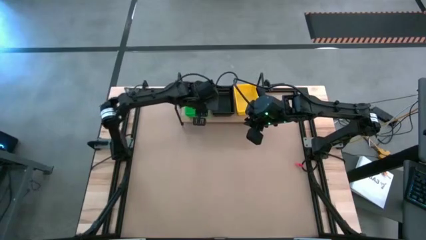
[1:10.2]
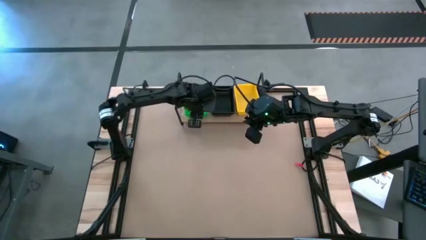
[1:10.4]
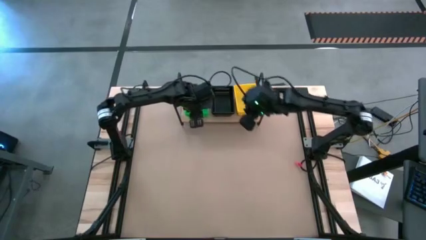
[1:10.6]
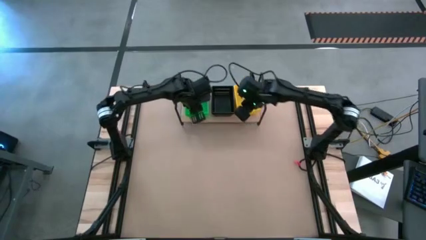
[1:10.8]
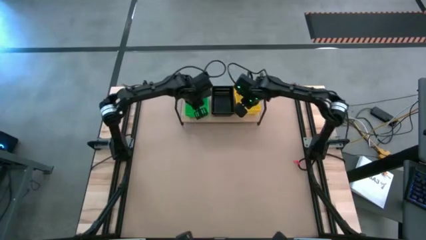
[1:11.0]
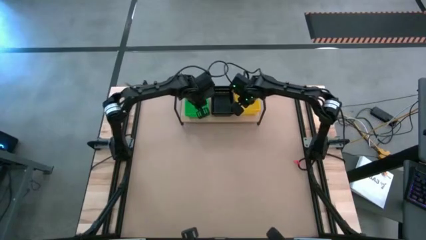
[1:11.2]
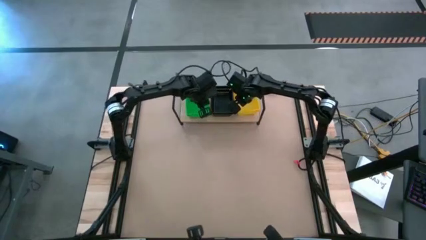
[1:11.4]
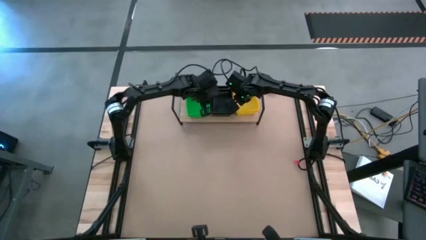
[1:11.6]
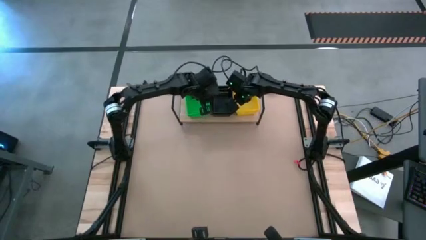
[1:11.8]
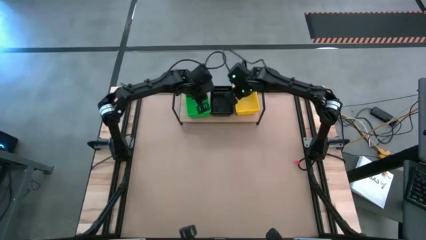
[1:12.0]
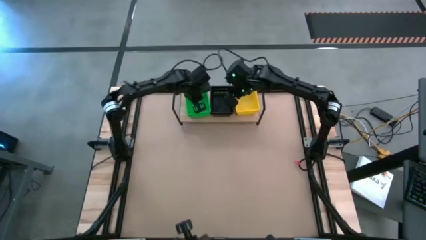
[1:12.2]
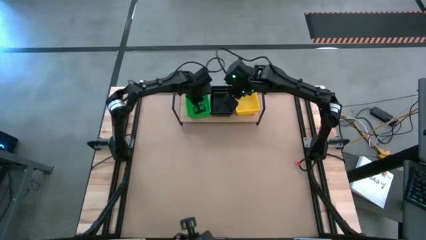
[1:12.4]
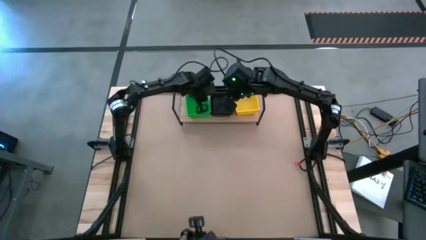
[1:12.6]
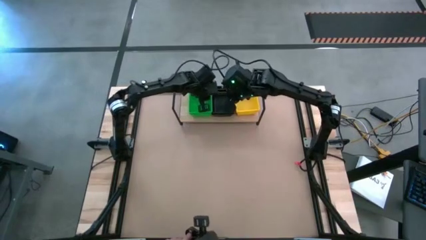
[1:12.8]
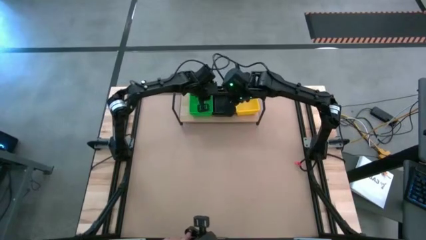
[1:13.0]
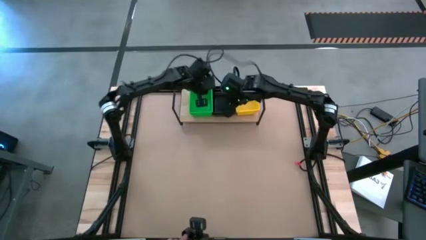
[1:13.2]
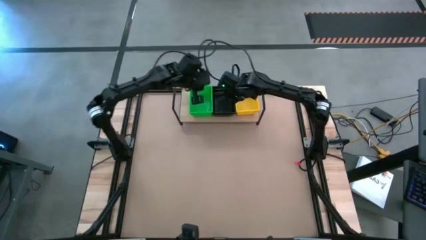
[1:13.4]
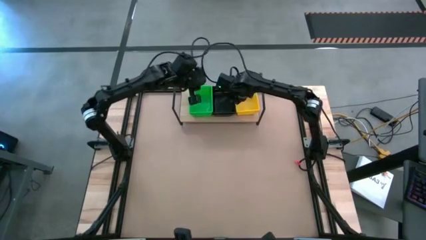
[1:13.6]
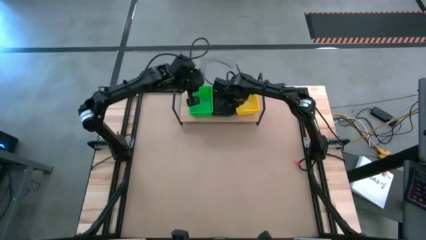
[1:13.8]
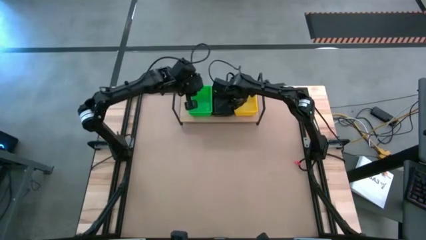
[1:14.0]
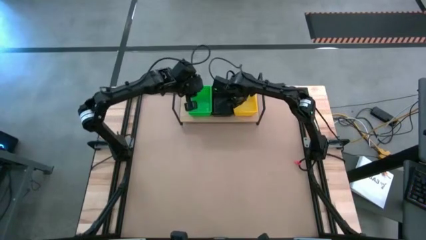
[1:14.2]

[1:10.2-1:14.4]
Task: Stack baskets on shelf by color
Adjust the stacked baskets on the shelf

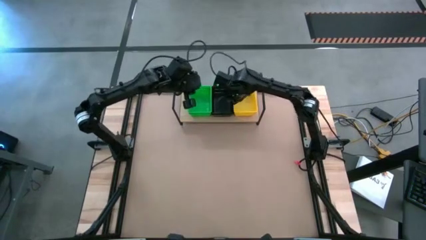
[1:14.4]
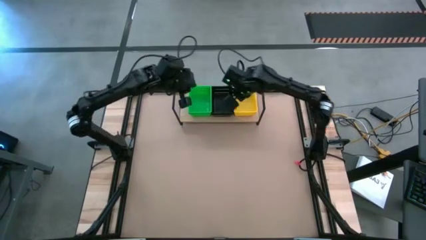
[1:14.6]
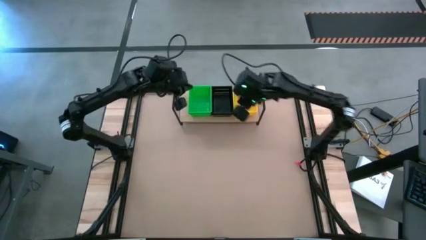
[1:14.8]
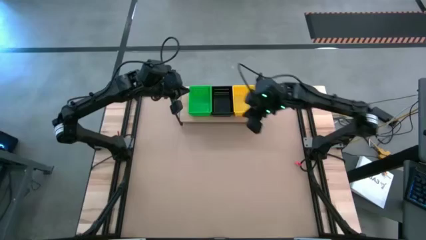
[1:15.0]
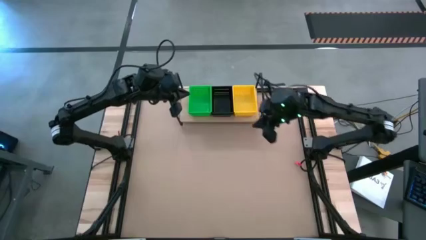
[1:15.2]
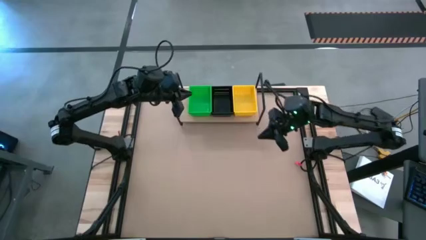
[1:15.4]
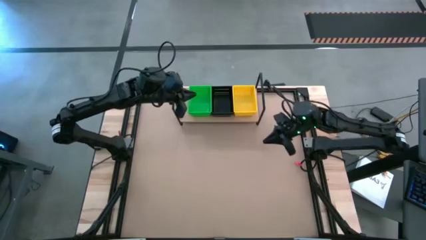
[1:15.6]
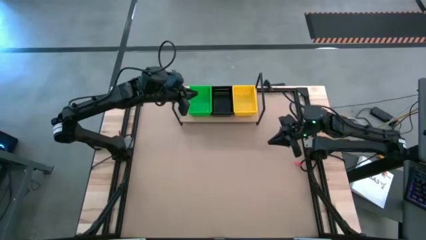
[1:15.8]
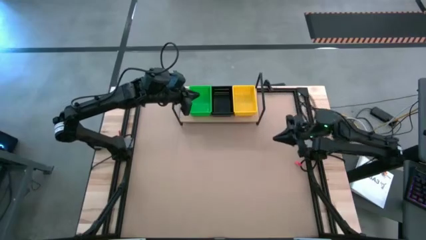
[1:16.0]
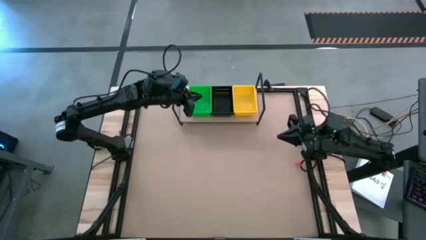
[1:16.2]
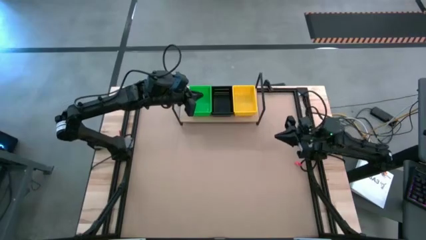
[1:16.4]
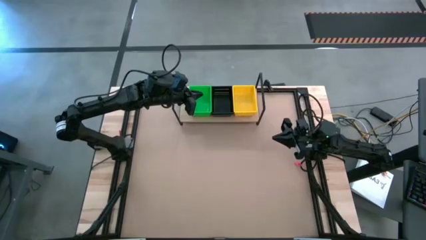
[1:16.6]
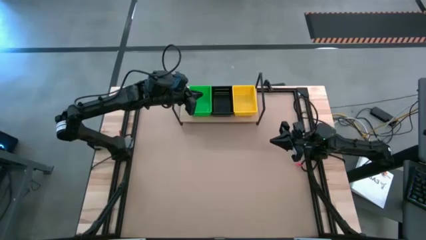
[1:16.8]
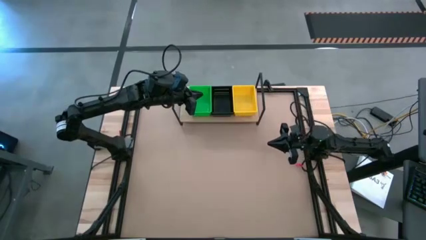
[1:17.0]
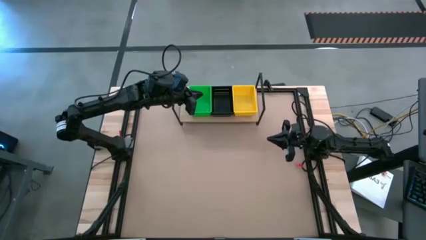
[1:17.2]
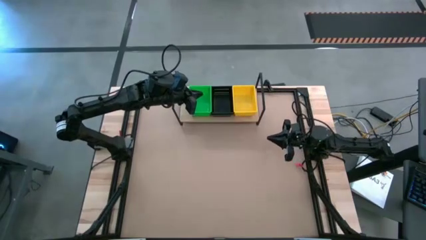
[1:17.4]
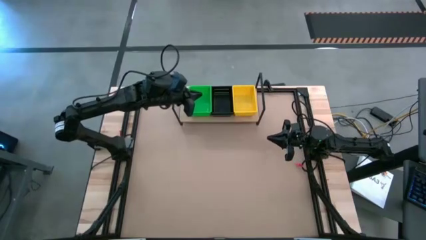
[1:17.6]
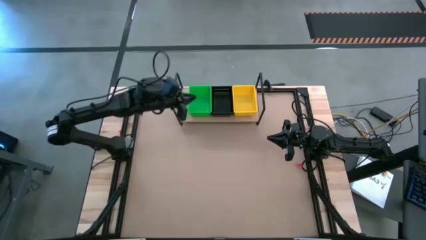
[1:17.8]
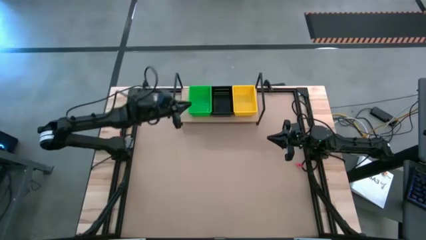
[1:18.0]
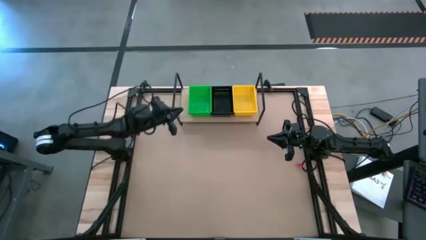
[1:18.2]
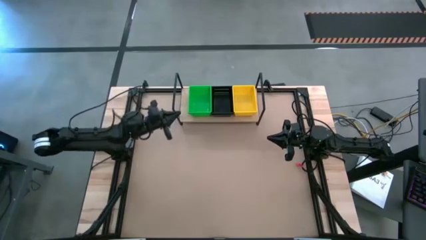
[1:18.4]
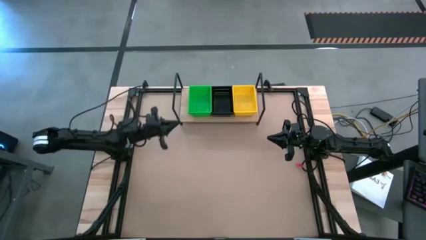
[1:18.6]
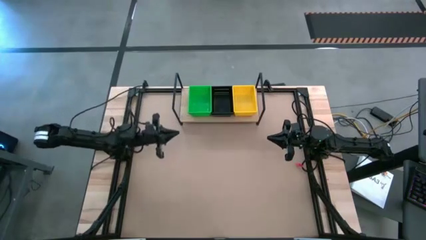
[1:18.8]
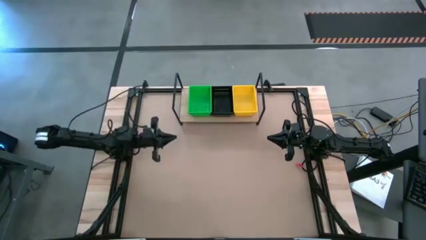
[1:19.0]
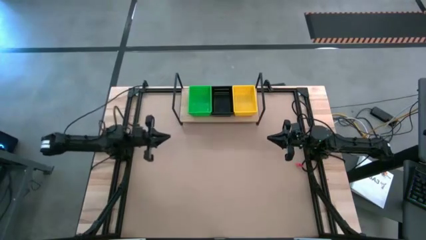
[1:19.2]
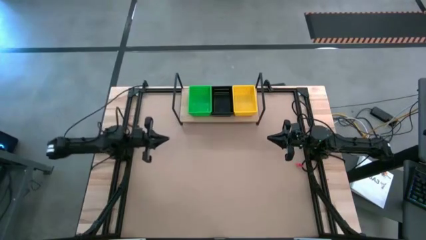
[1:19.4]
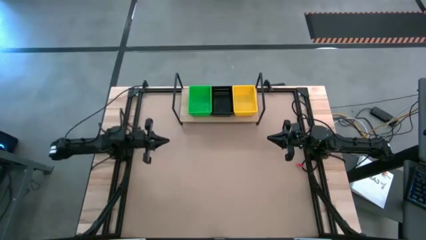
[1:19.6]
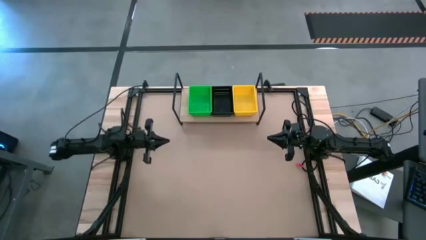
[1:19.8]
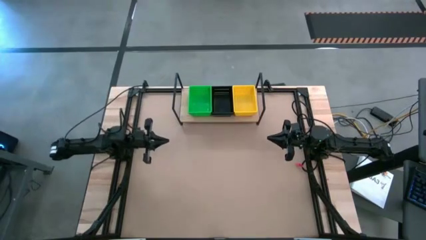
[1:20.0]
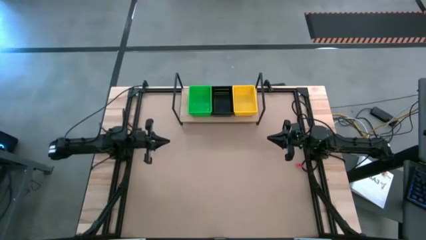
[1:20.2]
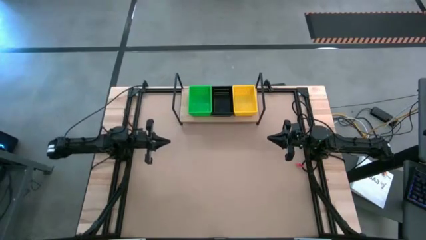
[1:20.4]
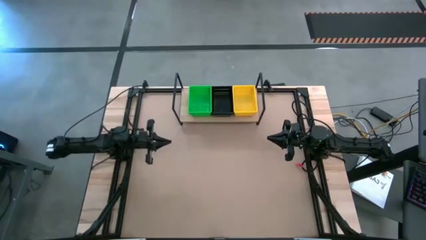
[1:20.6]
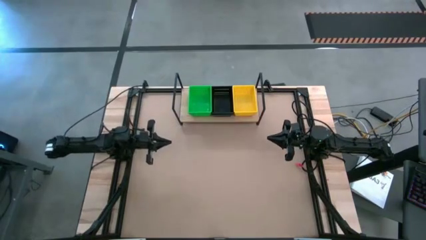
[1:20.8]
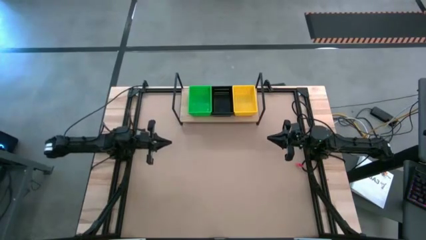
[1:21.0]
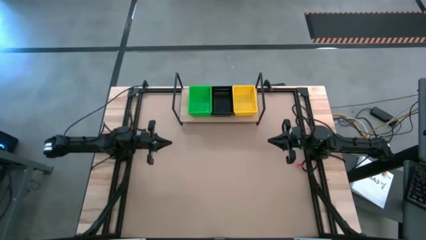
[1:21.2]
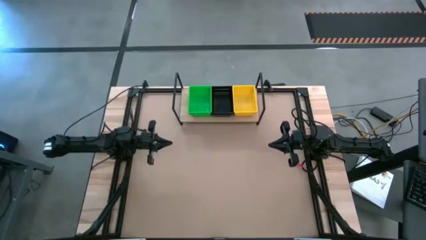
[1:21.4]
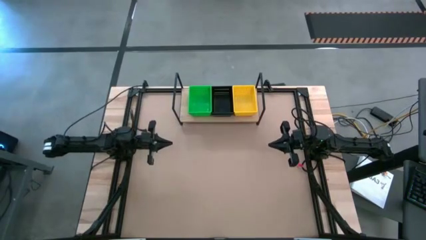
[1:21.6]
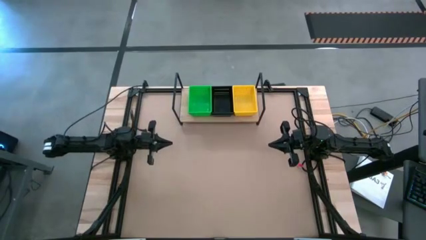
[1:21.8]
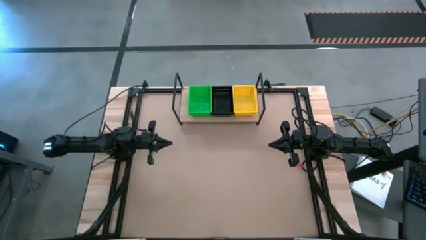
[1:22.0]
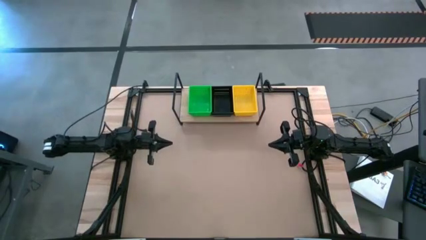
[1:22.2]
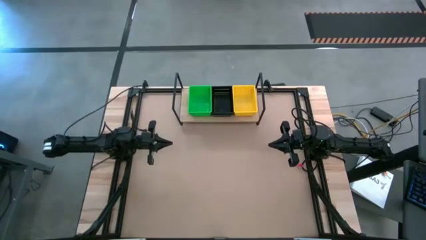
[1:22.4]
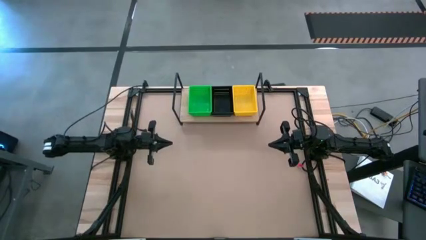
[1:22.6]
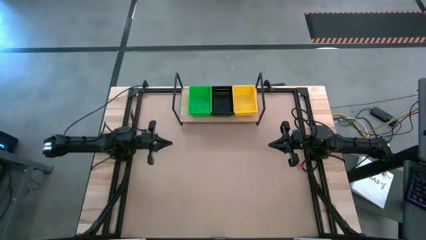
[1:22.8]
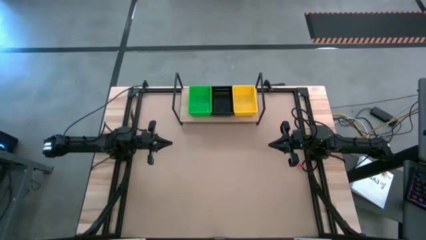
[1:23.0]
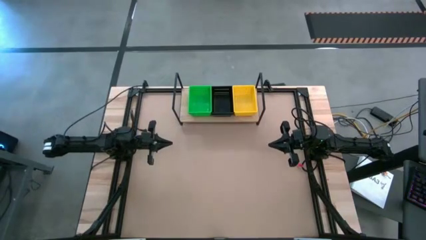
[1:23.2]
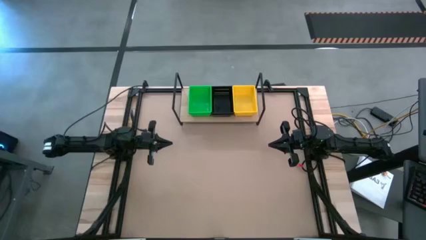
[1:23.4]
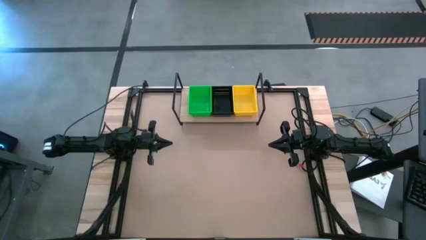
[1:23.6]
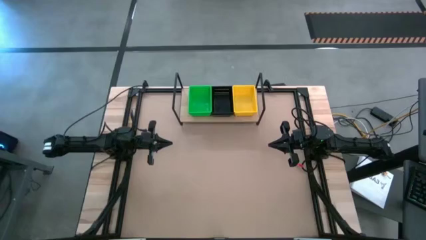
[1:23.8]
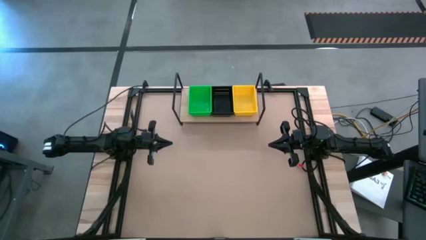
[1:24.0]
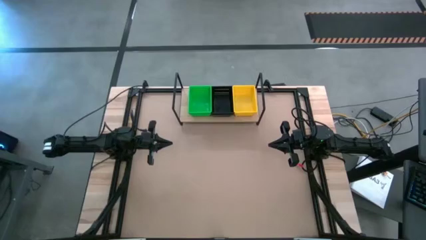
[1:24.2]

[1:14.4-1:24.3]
Return to Home Position

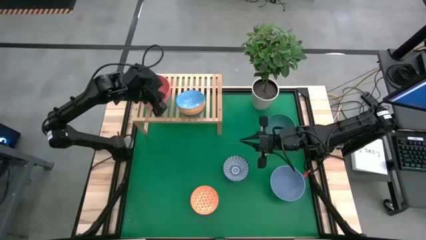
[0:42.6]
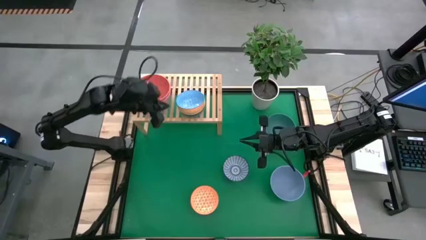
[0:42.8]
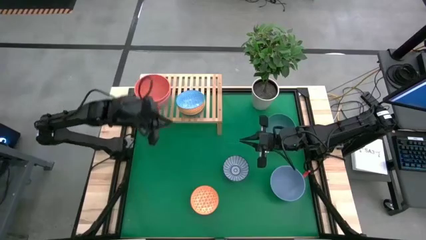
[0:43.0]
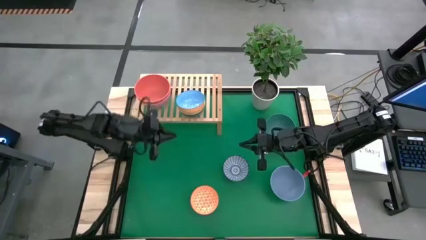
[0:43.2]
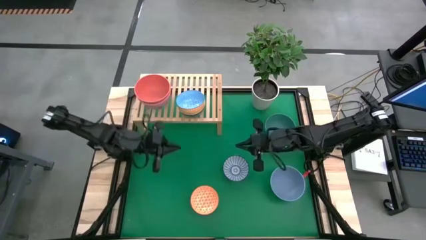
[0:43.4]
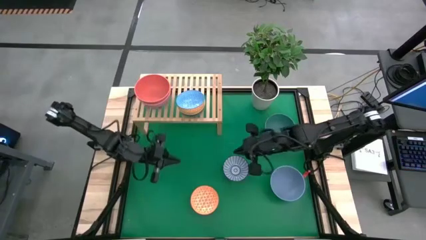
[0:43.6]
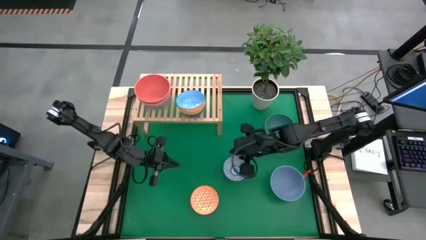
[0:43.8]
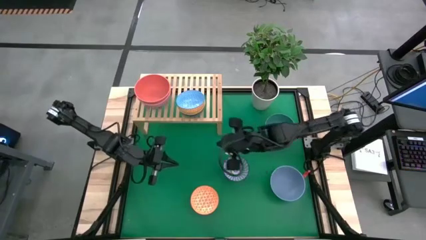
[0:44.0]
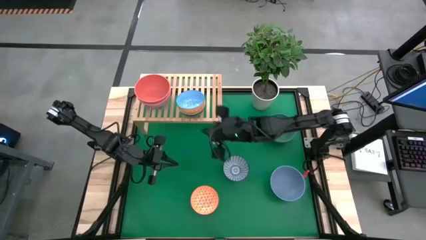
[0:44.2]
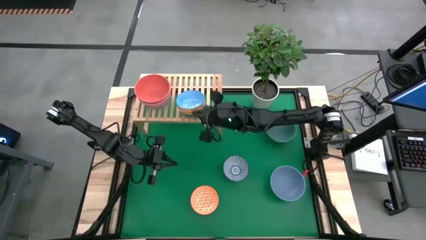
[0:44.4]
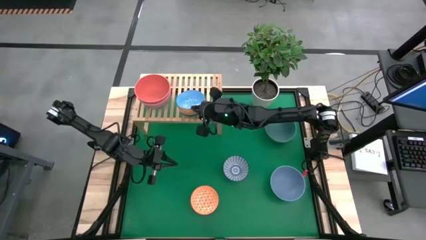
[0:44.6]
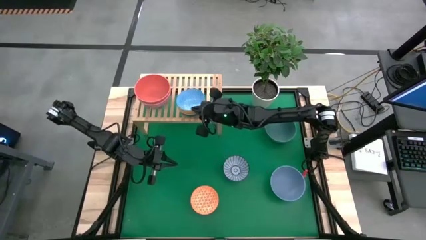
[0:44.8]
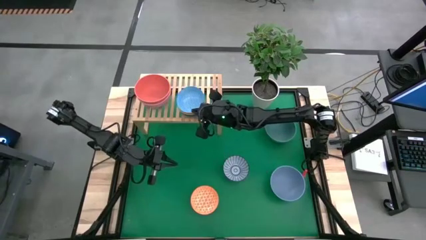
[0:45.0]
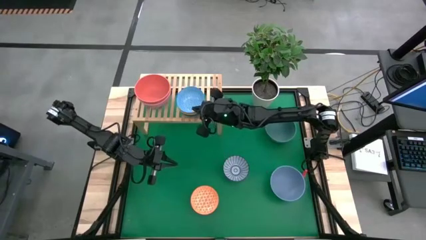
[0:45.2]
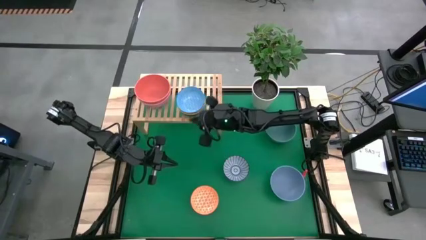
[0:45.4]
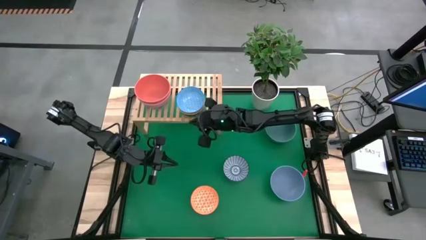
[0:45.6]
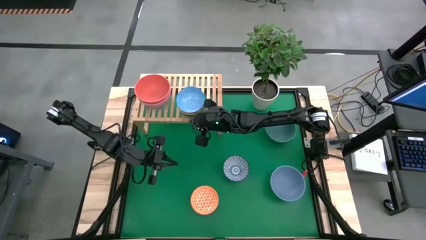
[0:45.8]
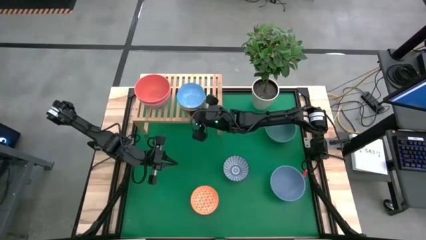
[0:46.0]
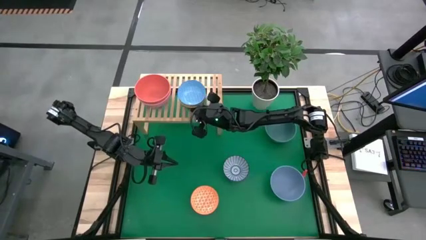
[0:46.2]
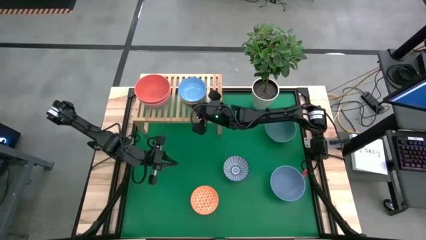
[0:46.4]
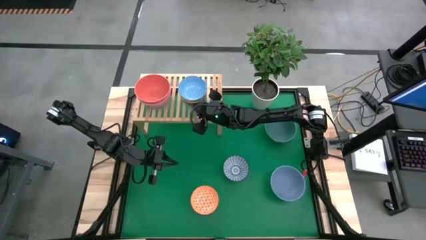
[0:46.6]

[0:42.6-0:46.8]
Task: Place and stack bowls onto a shelf
Adjust the stacked bowls on the shelf
